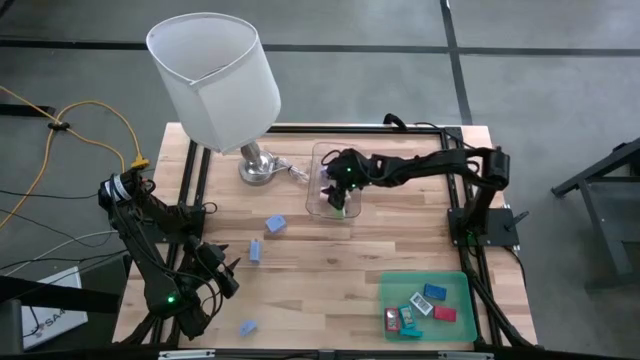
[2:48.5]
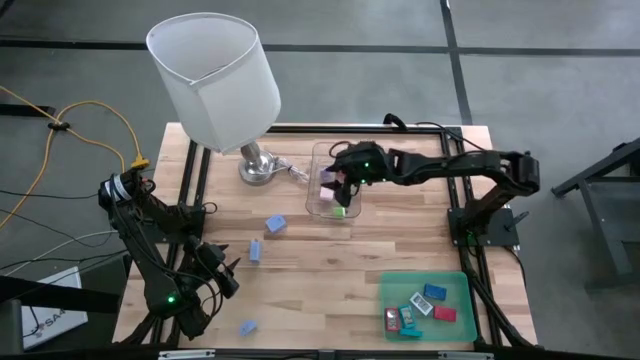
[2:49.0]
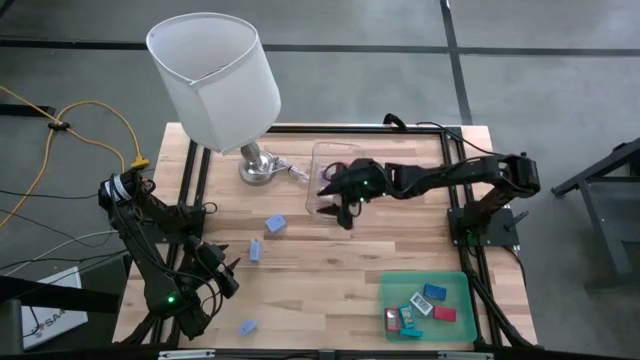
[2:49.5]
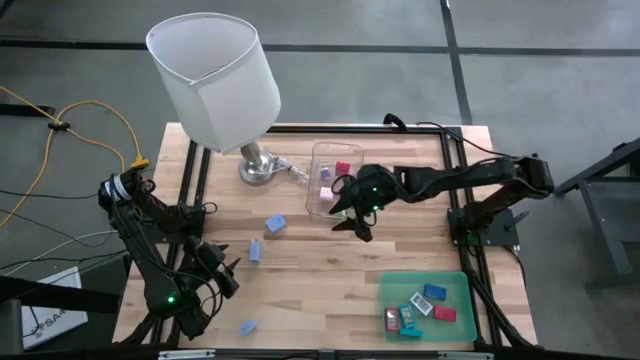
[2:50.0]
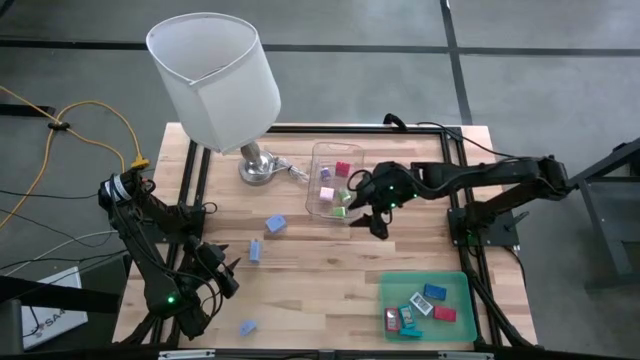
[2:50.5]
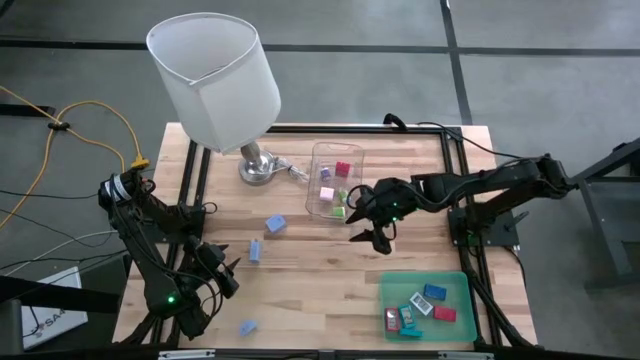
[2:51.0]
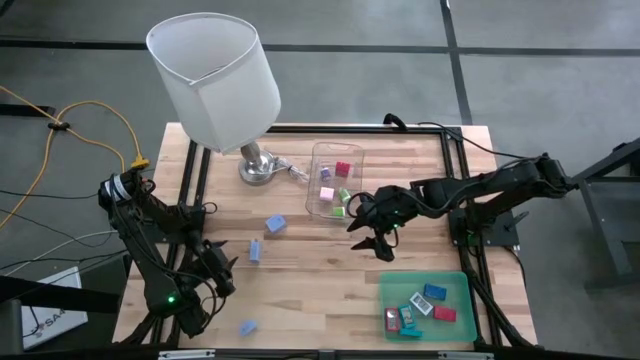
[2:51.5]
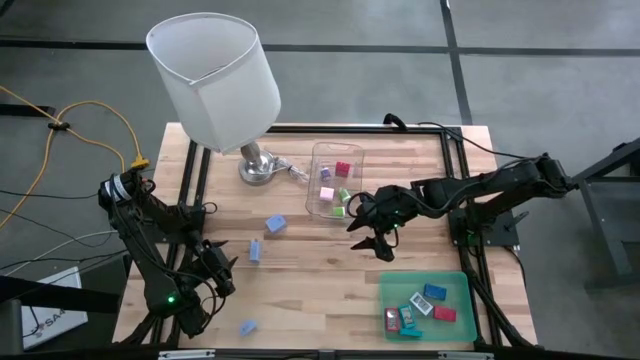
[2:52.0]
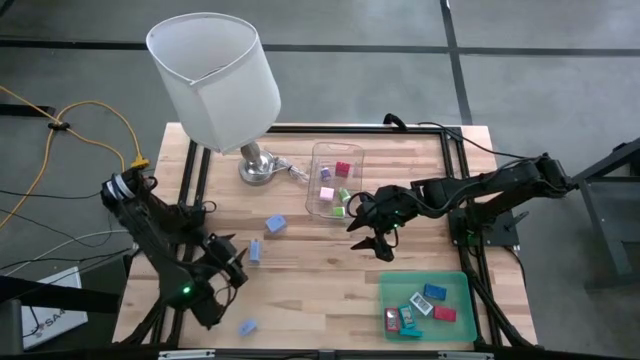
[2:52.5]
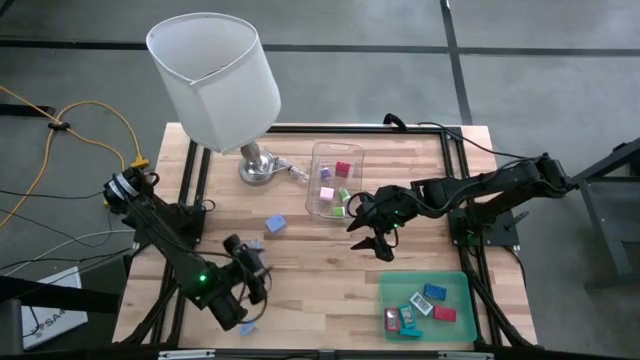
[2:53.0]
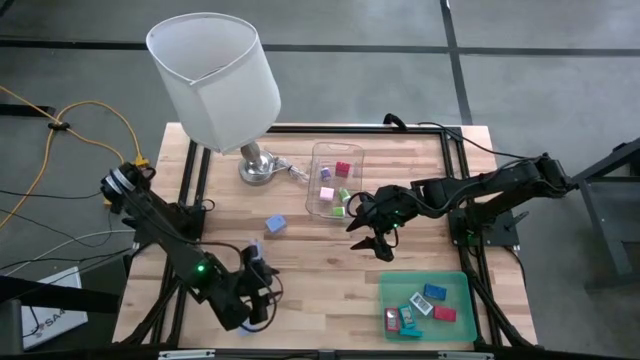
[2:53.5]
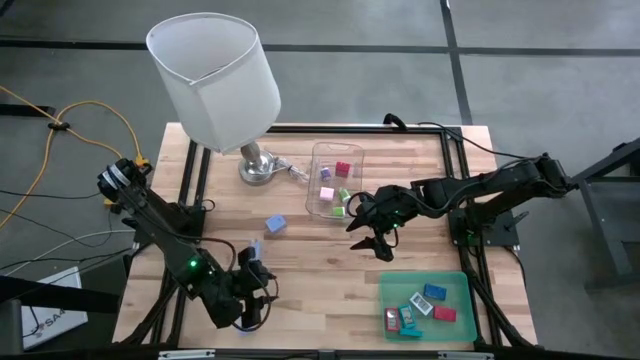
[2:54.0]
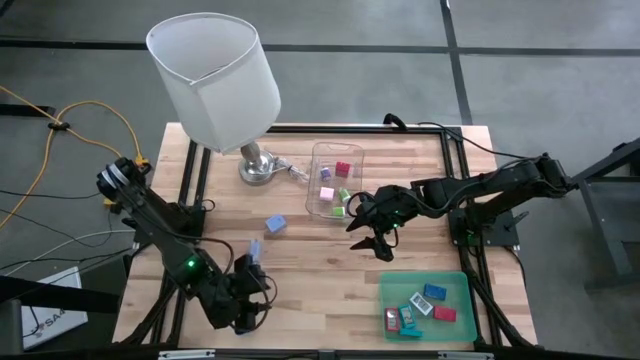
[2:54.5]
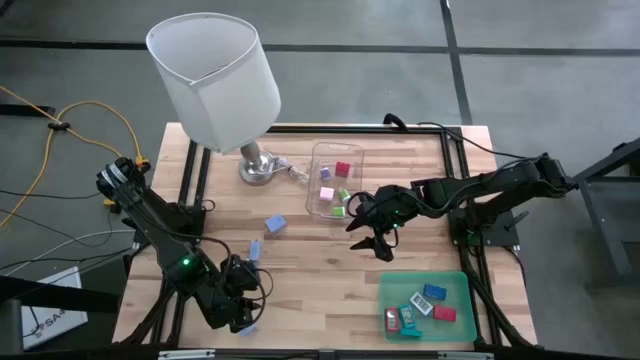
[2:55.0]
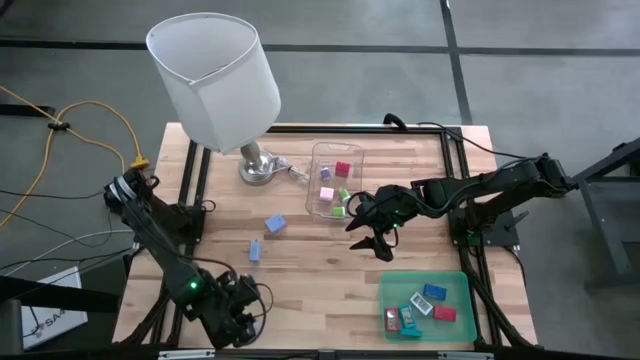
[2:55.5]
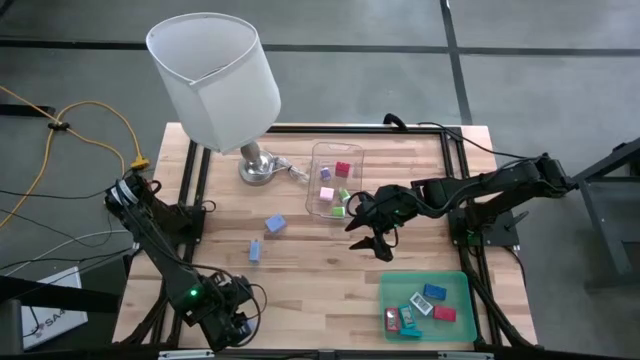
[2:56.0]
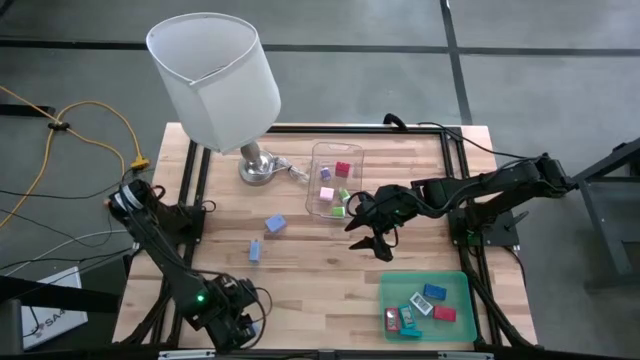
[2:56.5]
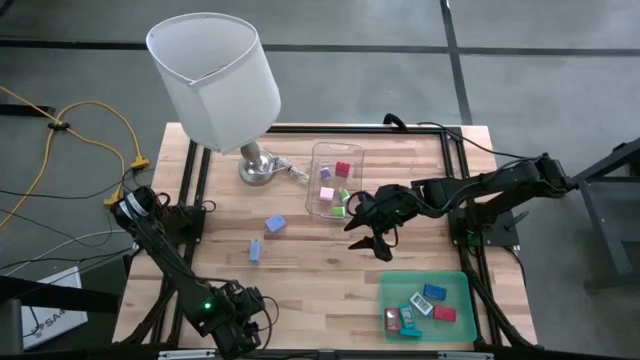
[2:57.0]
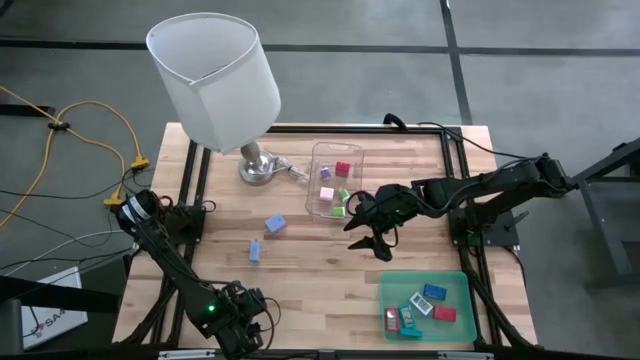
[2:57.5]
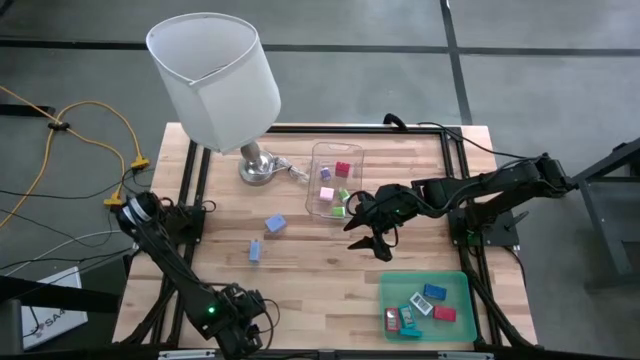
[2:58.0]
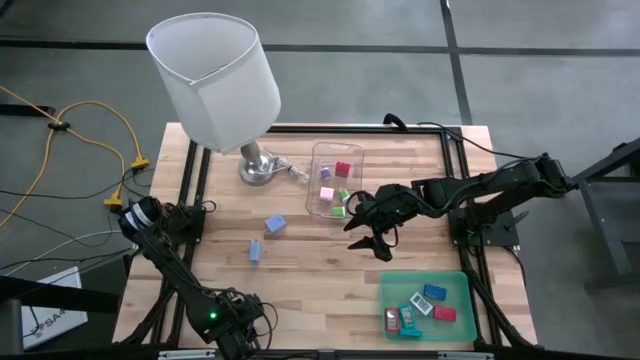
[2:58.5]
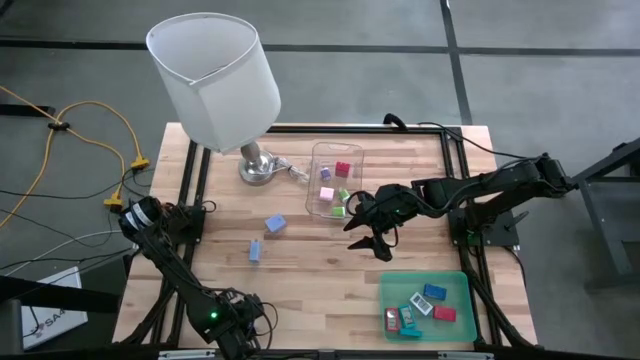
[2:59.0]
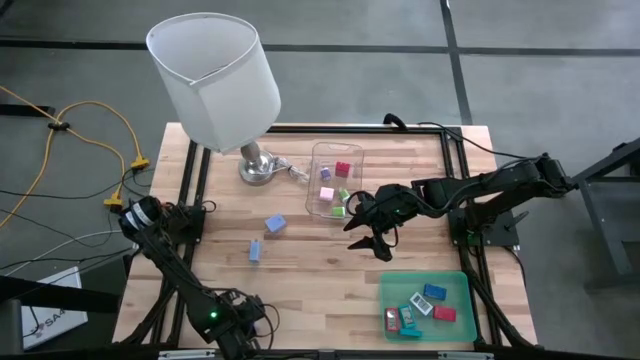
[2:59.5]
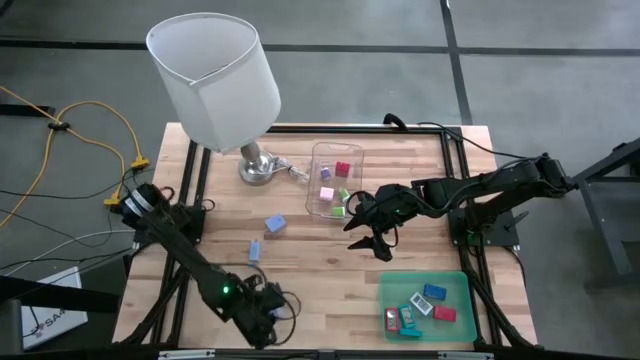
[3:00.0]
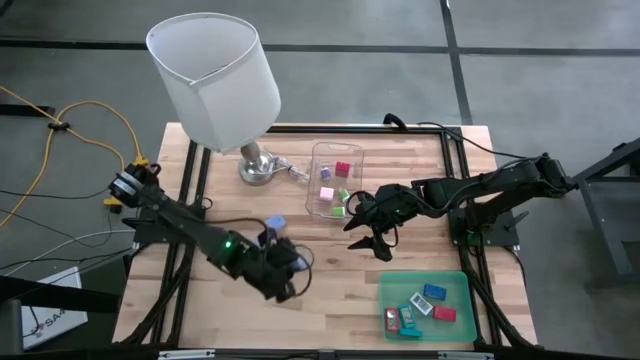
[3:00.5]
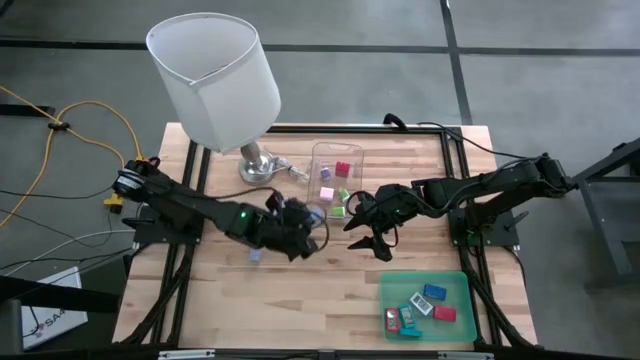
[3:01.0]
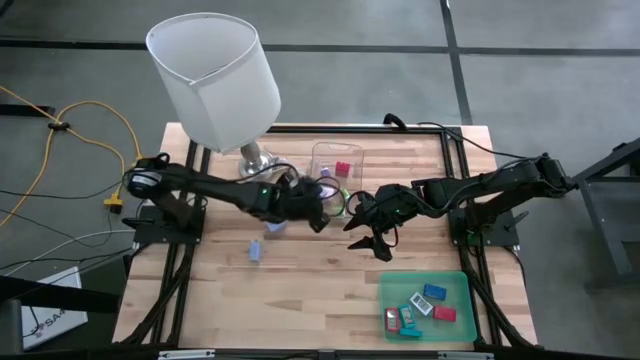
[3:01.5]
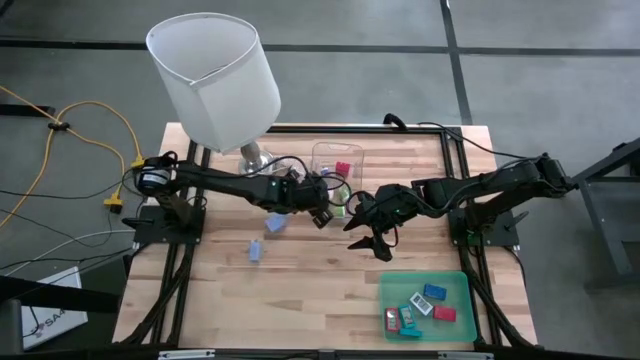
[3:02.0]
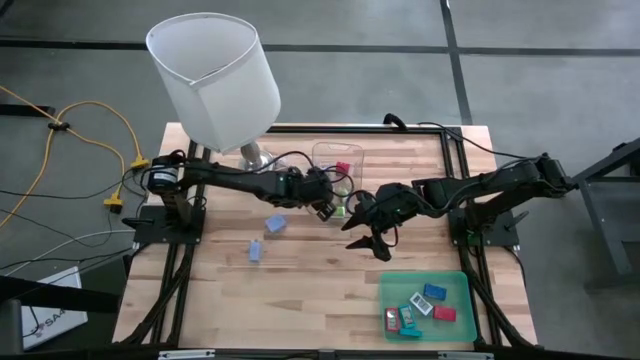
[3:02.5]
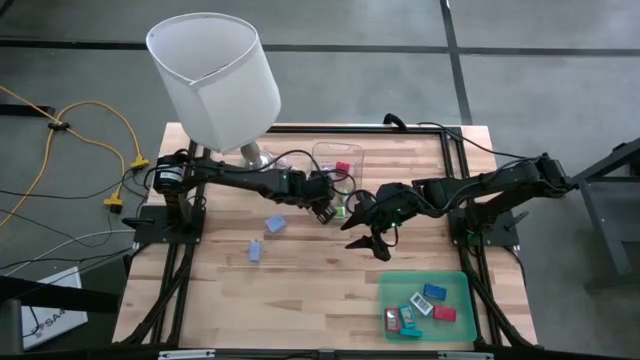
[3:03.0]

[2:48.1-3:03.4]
Task: Pick & Place Office items
Put the bottom light blue charger adapter into the transparent bin

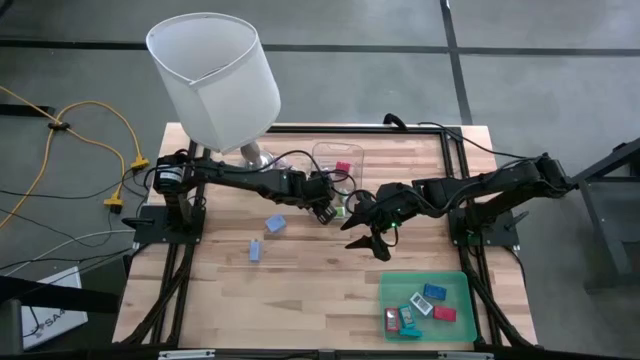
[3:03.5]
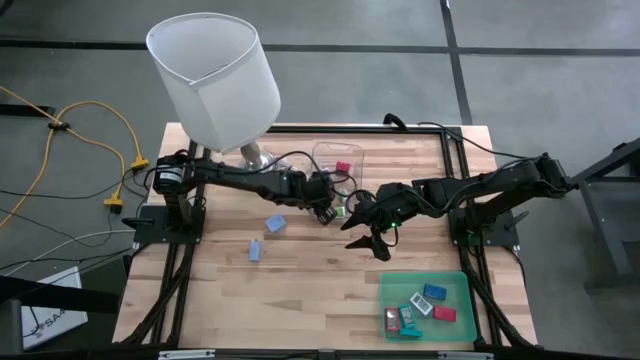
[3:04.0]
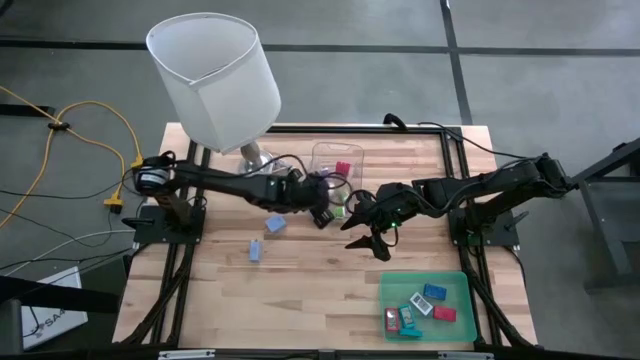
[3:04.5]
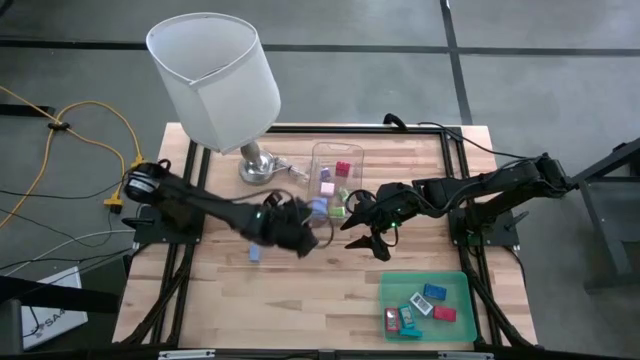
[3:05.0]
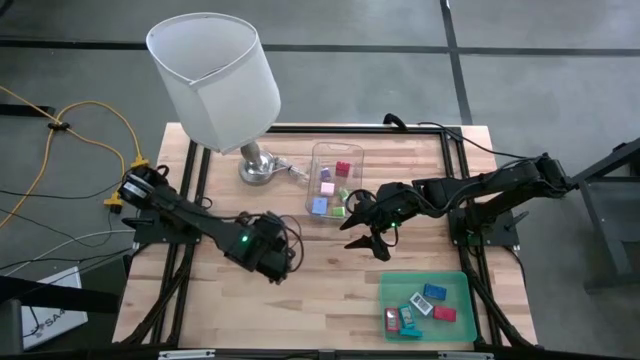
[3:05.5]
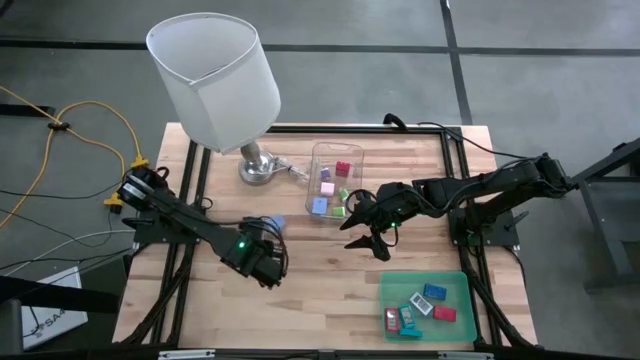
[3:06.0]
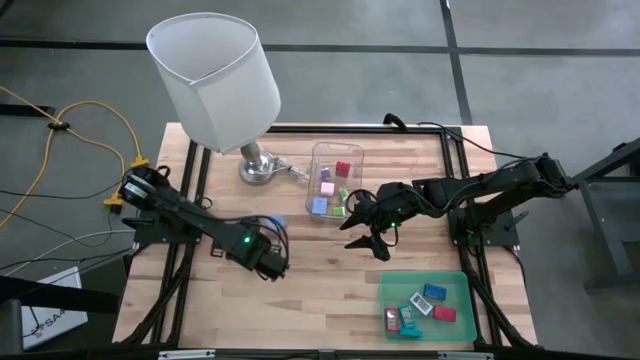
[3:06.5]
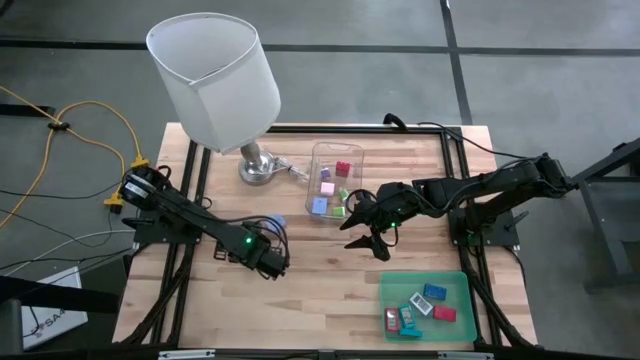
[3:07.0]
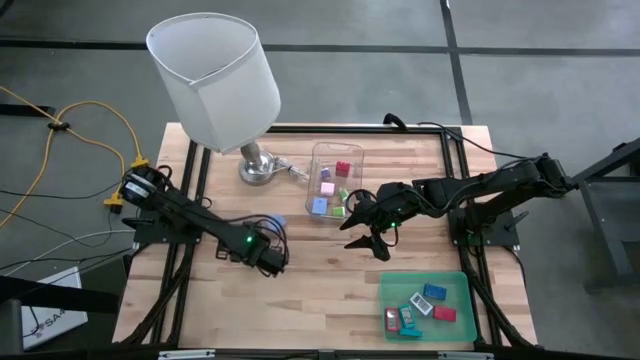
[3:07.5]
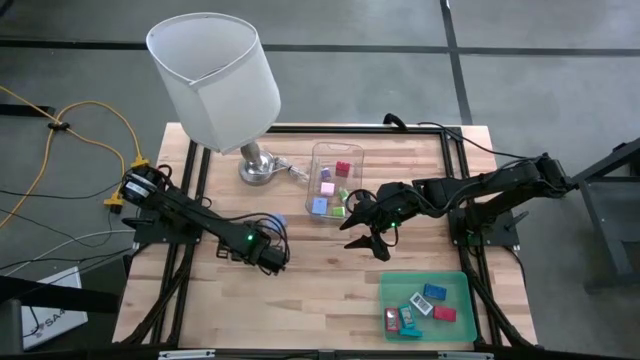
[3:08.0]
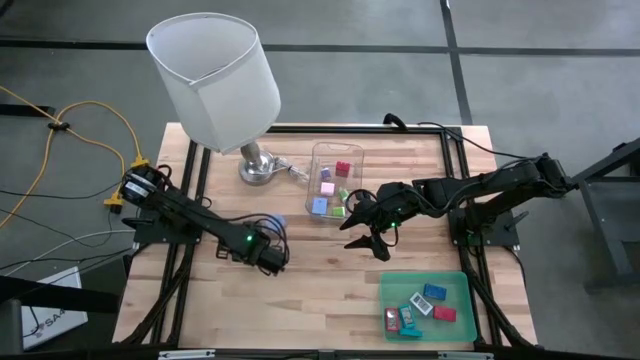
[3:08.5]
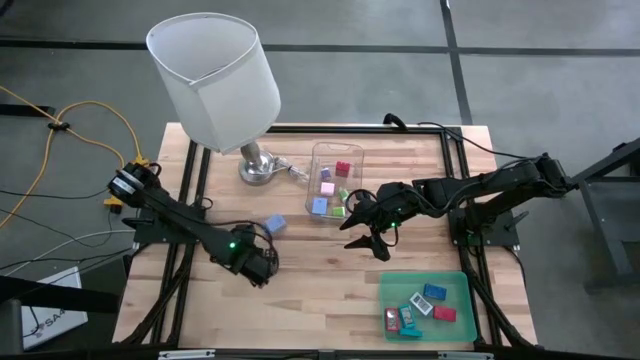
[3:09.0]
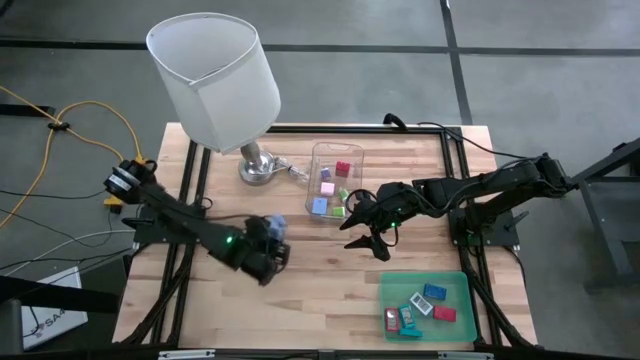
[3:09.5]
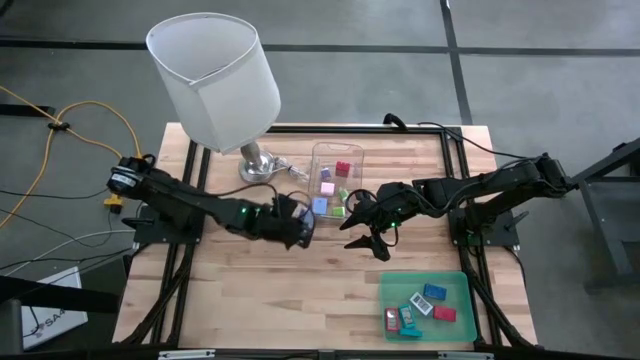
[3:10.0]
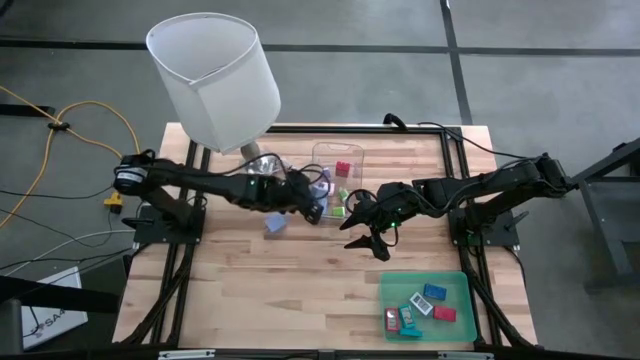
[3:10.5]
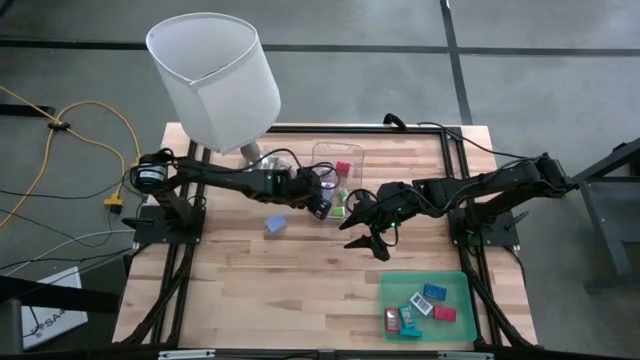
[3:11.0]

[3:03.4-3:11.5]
Put the bottom light blue charger adapter into the transparent bin
